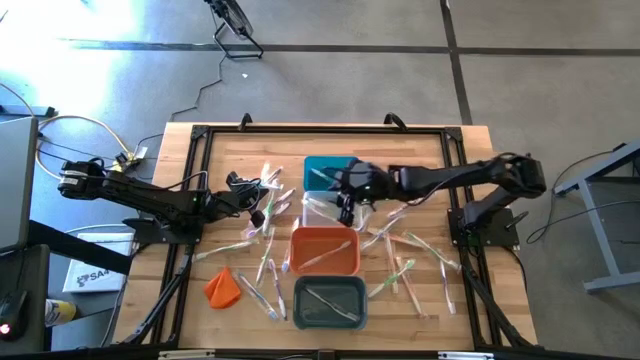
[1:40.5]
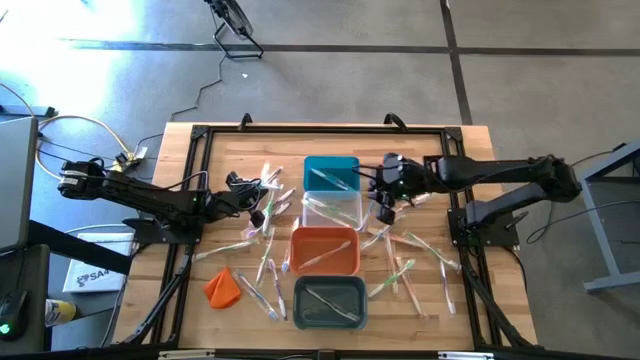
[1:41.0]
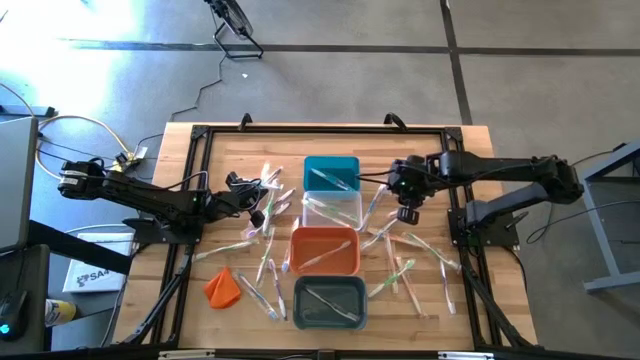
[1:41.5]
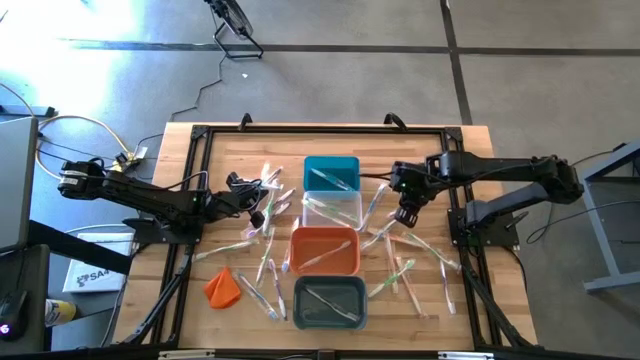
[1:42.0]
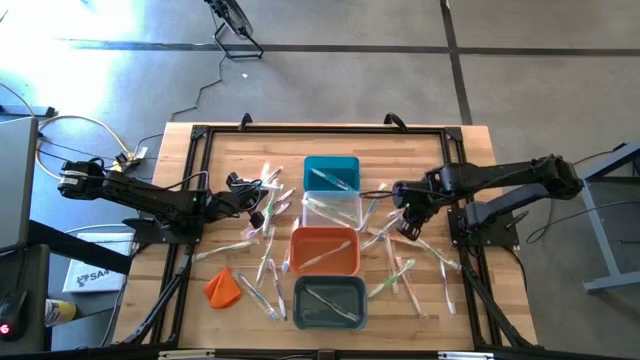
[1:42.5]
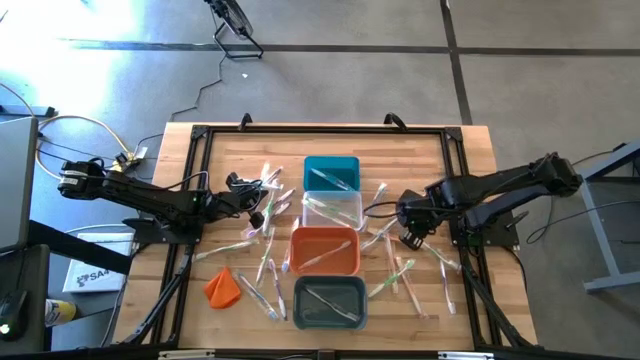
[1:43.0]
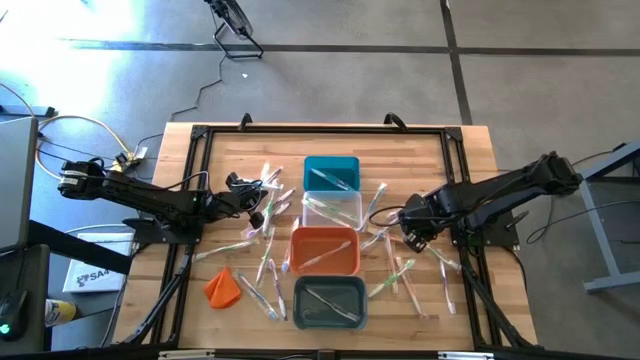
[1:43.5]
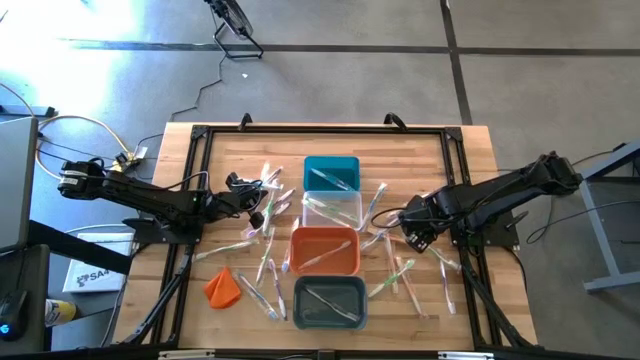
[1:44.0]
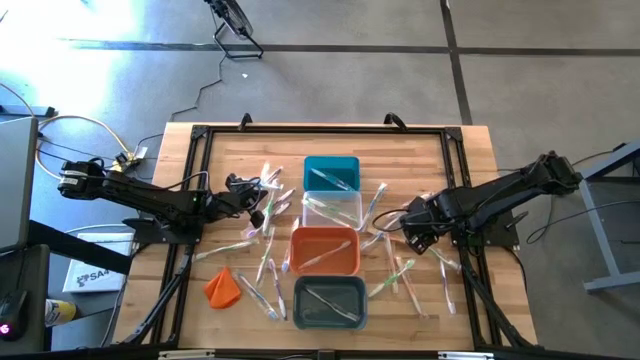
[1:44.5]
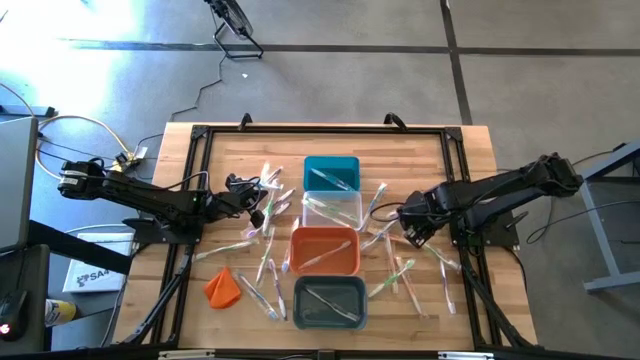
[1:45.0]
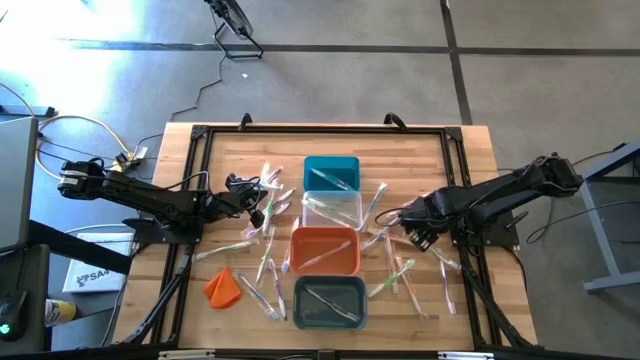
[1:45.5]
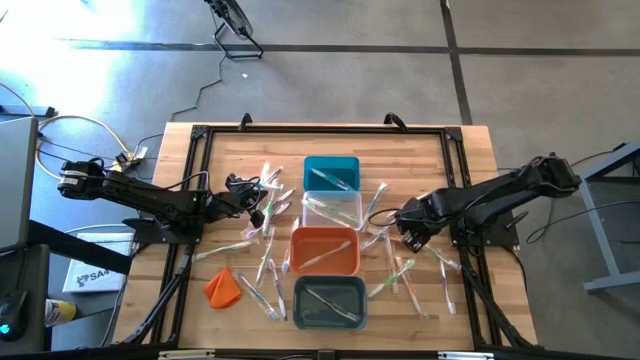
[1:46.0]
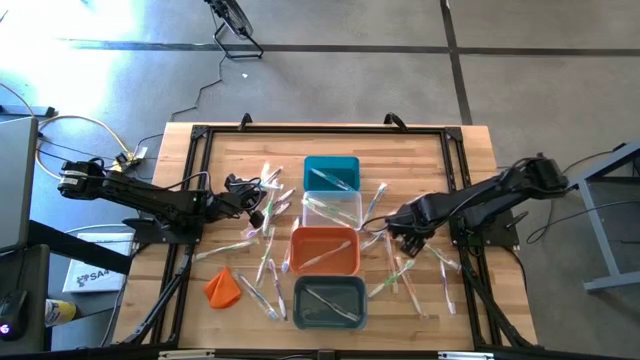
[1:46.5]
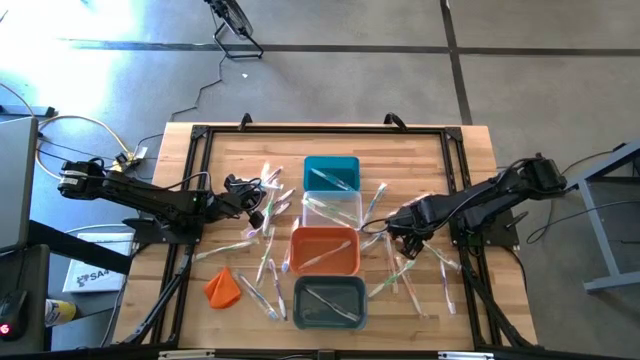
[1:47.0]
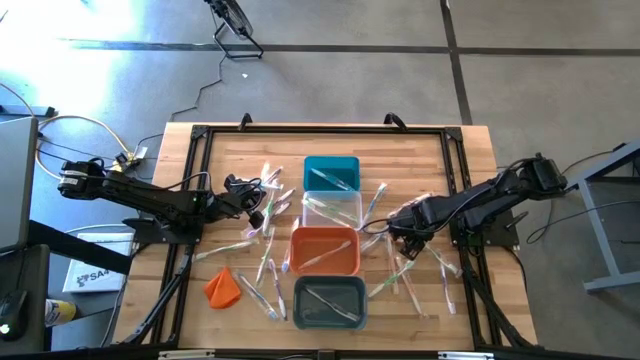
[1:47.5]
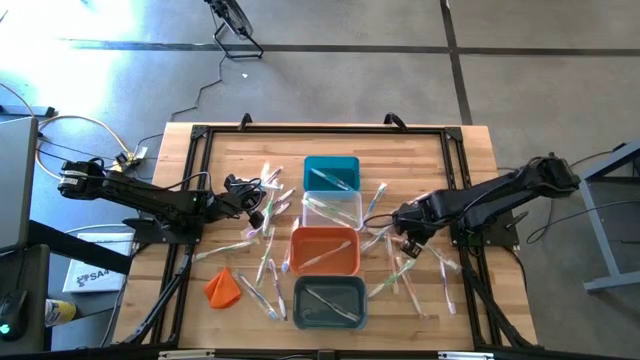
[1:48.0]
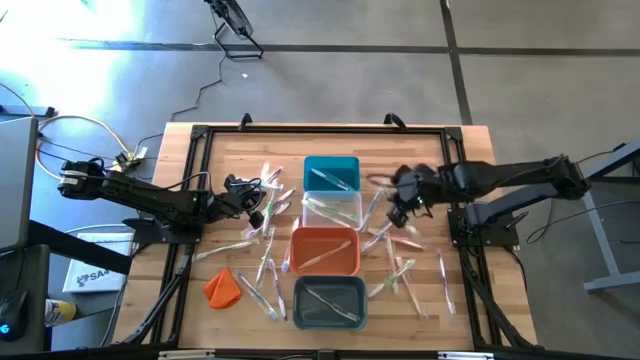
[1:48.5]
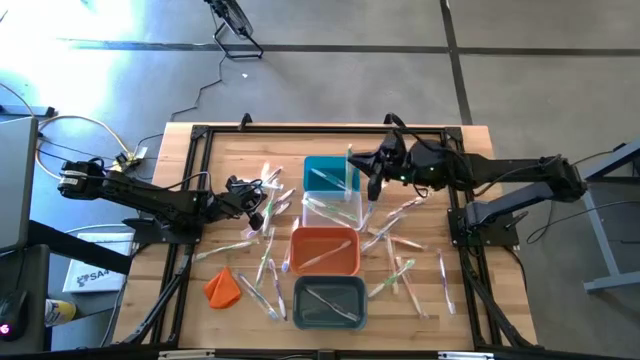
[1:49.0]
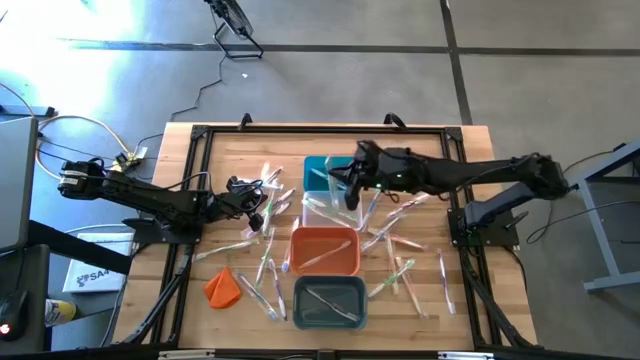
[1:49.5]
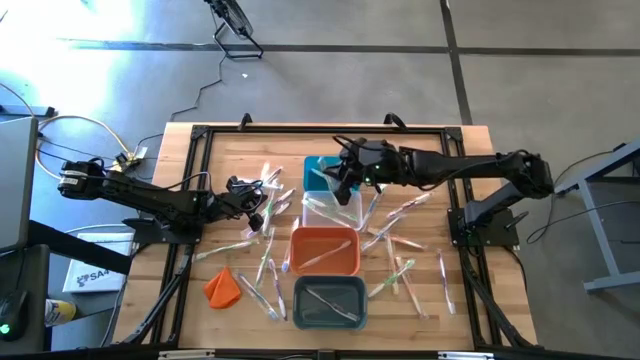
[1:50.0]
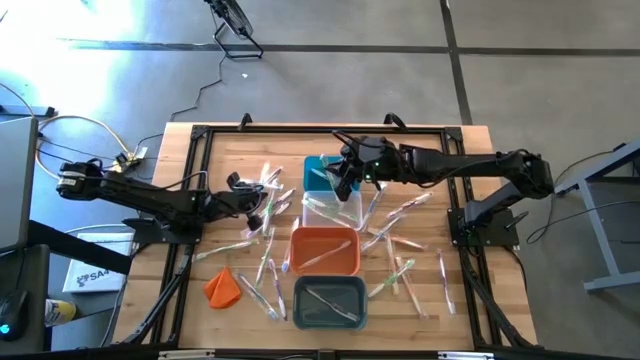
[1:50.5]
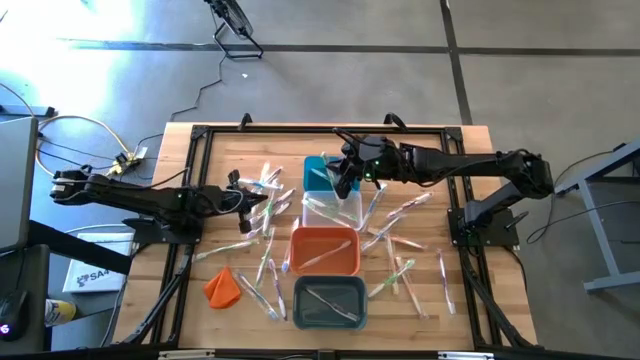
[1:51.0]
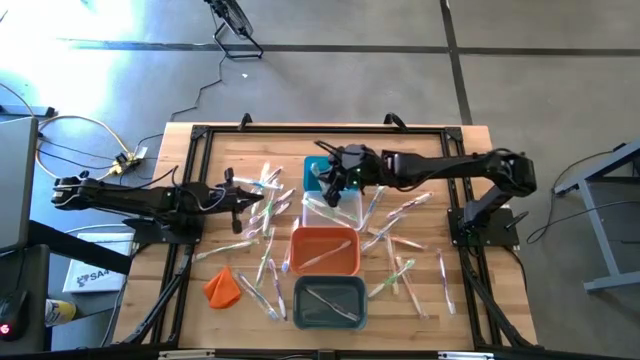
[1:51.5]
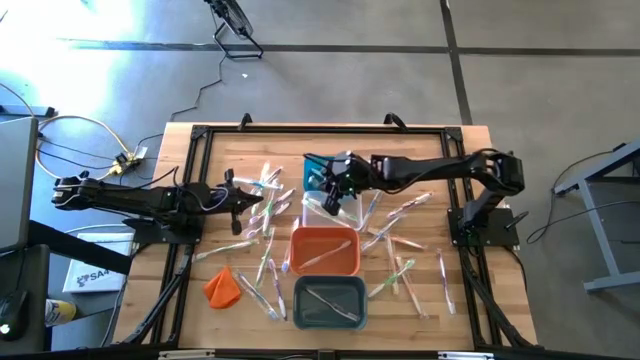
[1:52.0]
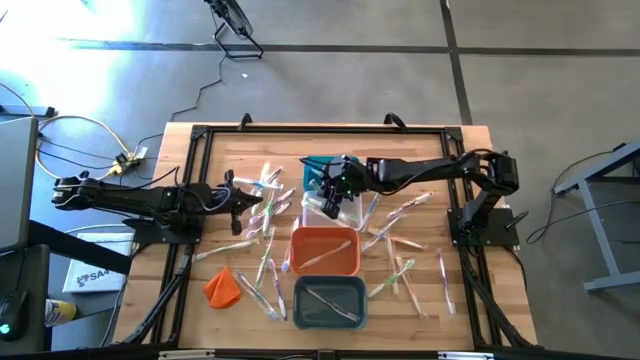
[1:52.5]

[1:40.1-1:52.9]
Task: Pick & Place Toothbrushes
Put the green toothbrush into the transparent bin

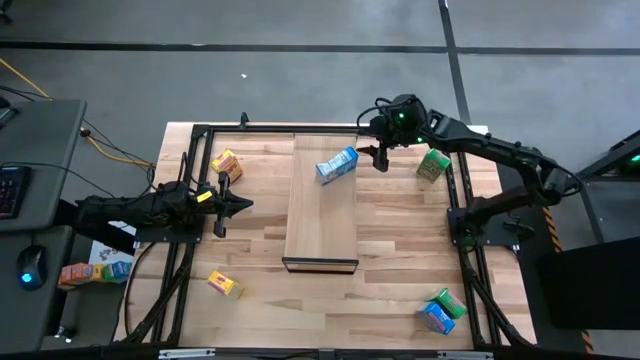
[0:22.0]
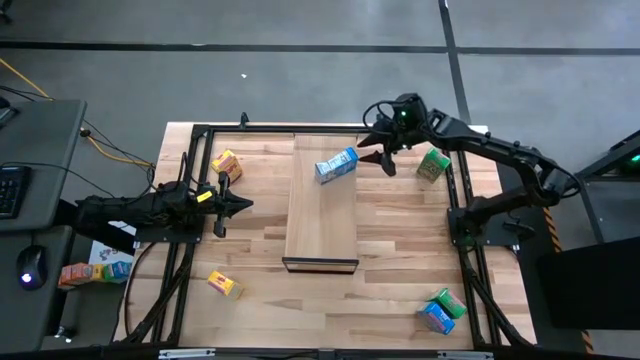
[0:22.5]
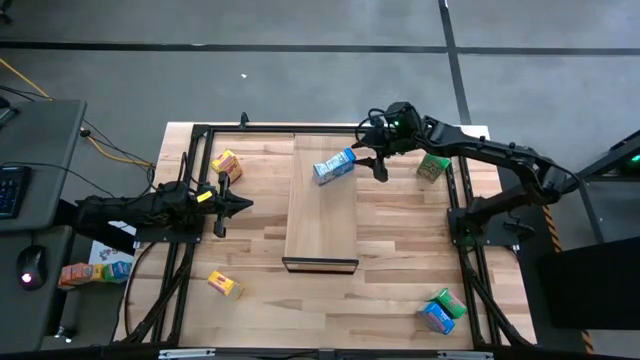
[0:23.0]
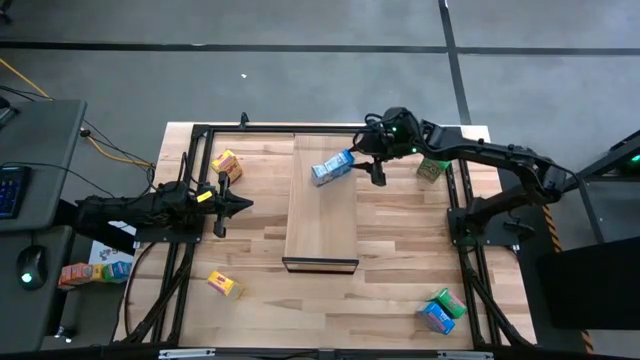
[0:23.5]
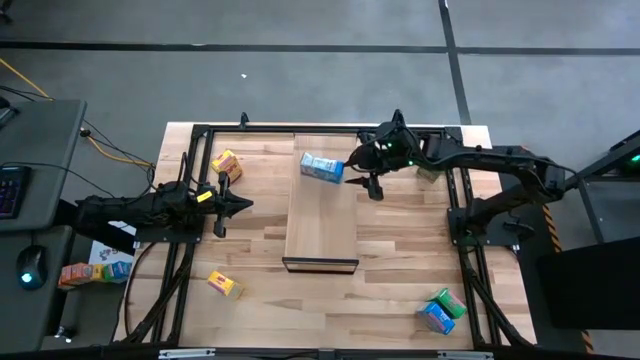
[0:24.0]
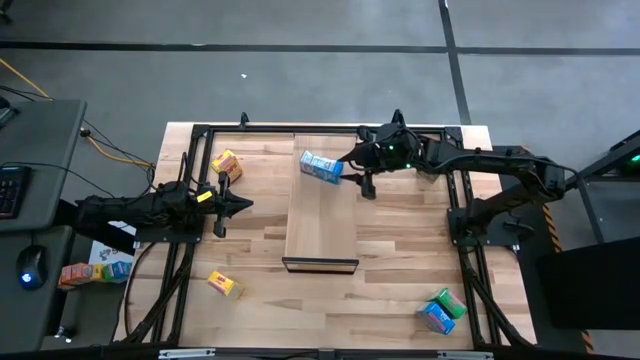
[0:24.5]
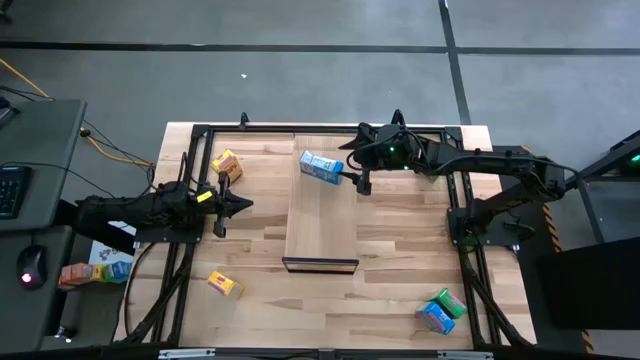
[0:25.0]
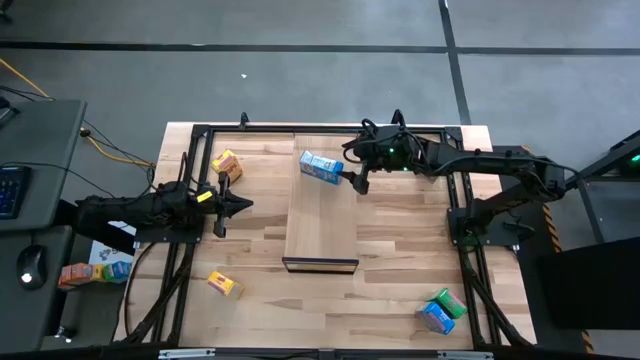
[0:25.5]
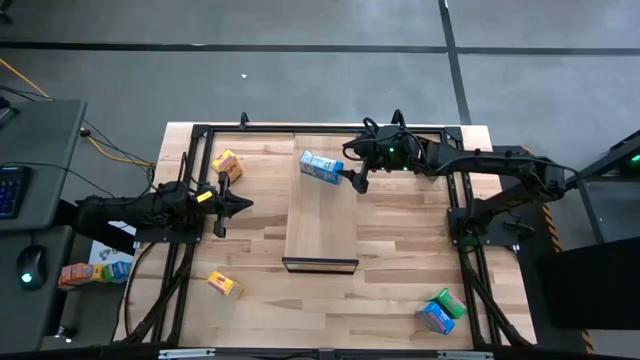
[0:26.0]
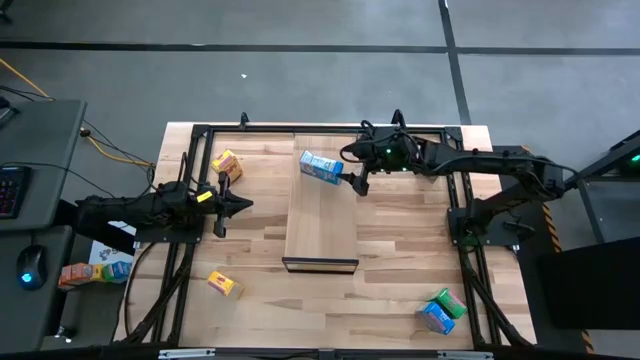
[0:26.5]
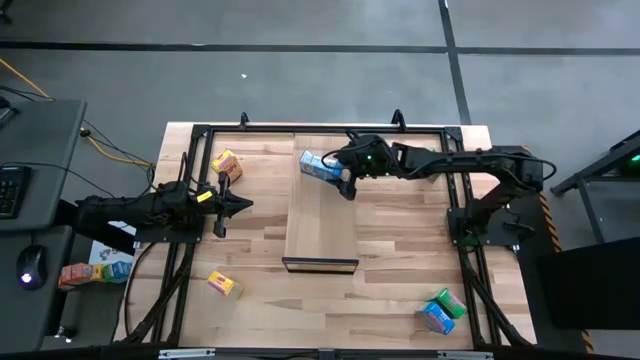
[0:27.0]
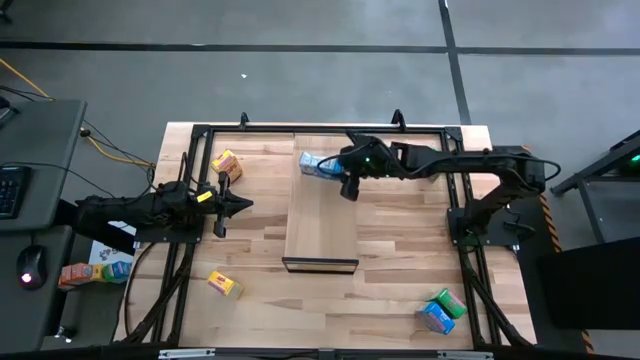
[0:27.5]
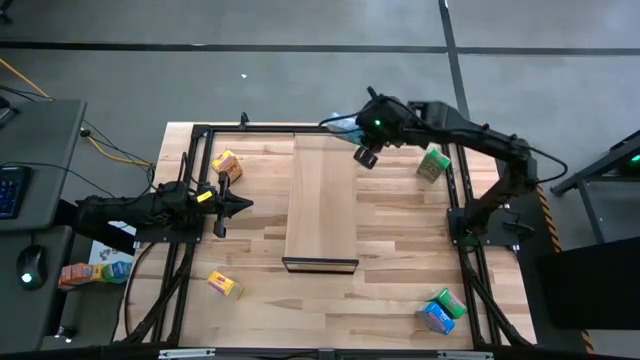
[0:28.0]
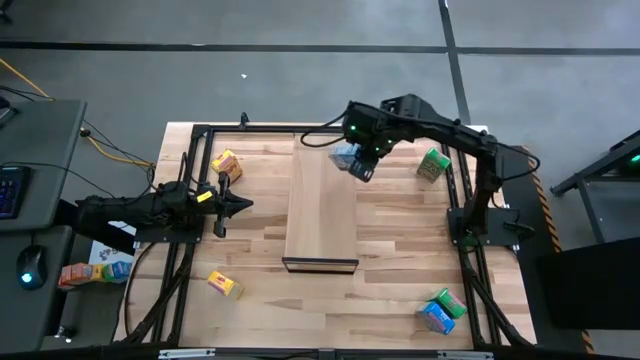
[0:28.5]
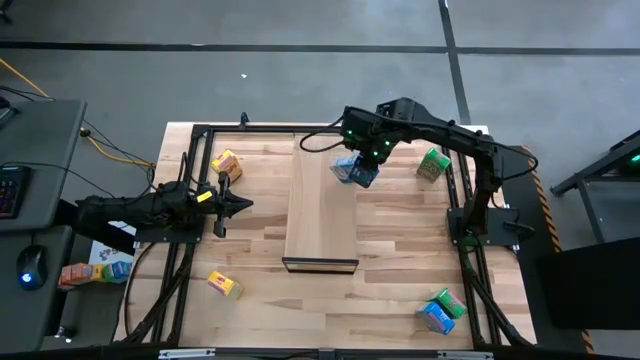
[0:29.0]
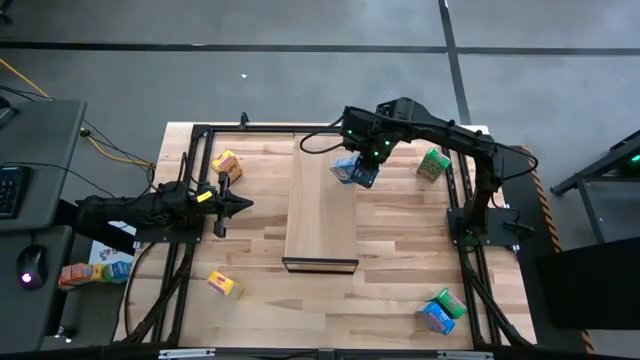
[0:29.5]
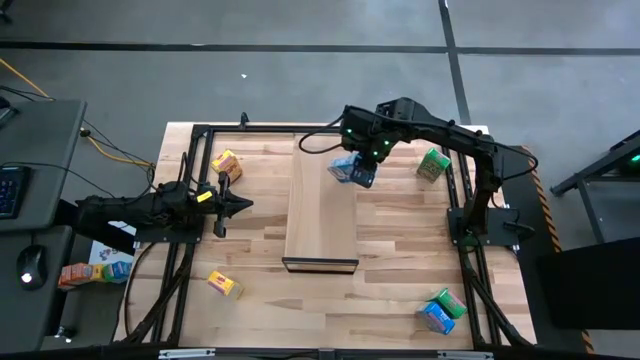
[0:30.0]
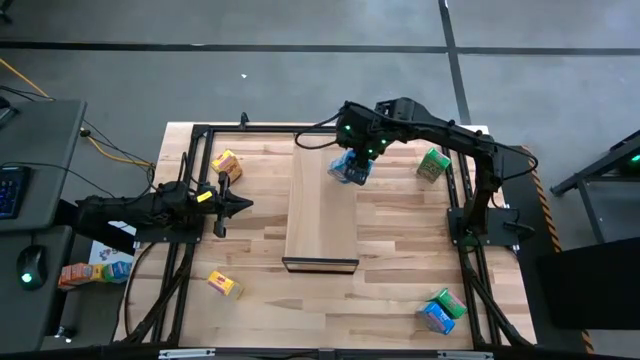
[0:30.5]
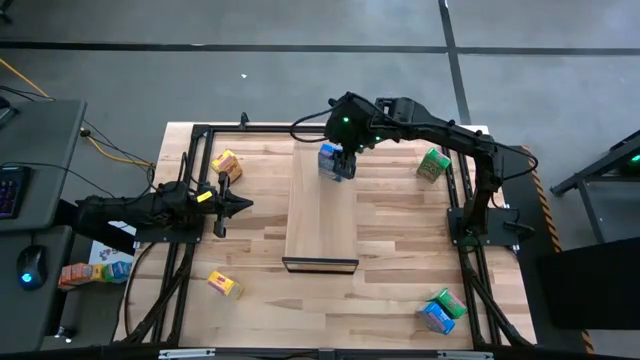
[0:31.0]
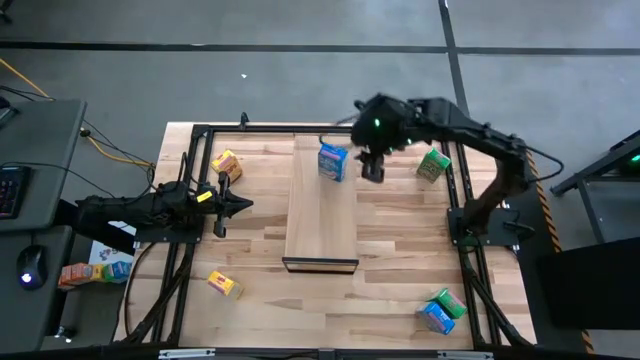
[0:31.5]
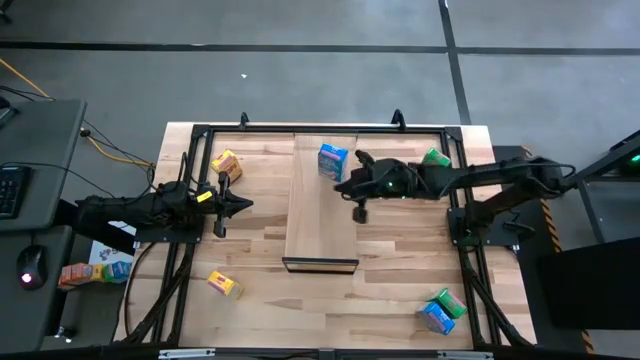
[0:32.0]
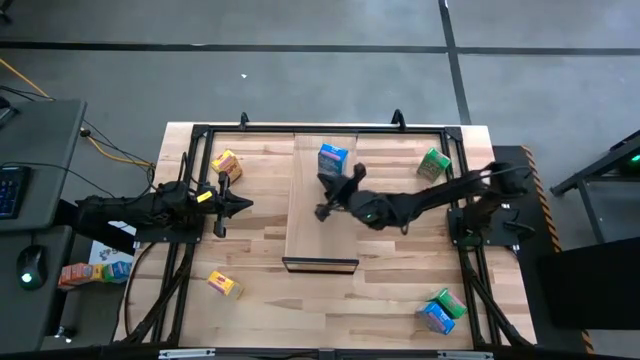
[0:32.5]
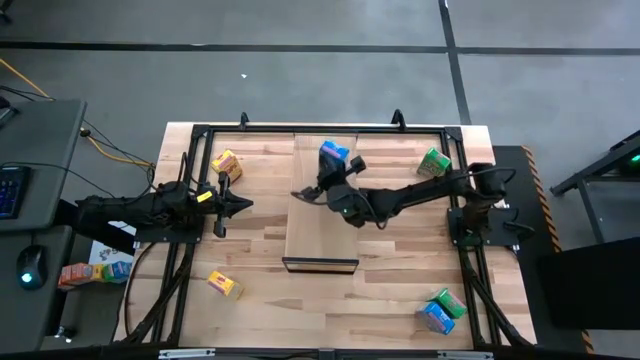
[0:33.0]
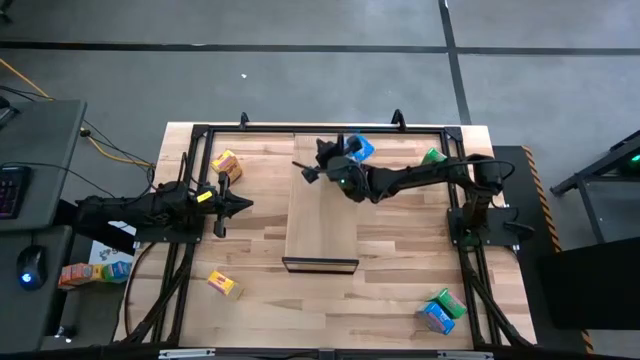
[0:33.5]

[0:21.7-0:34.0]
Task: Stack cereal on shelf
Adjust the blue cereal box on the shelf
